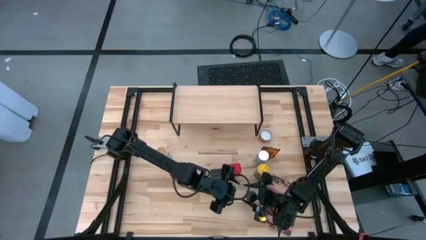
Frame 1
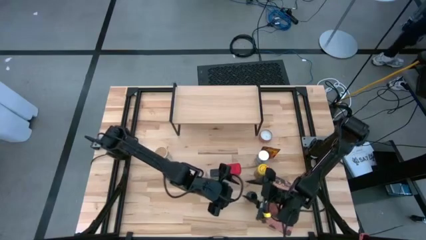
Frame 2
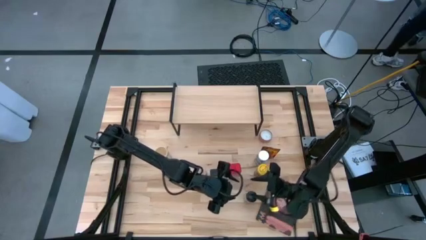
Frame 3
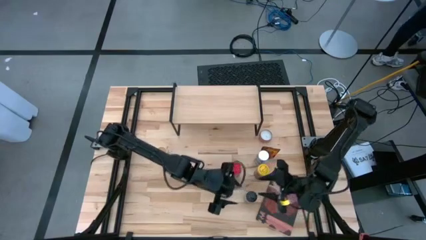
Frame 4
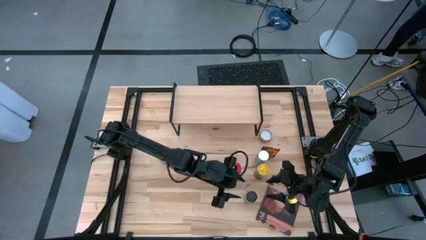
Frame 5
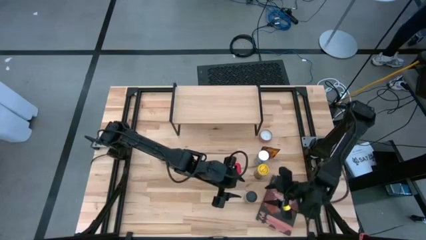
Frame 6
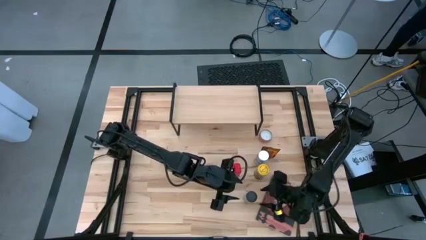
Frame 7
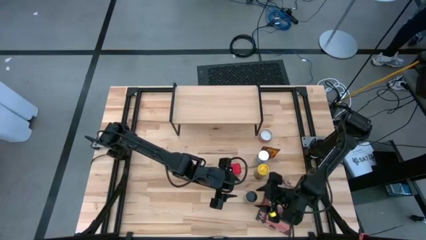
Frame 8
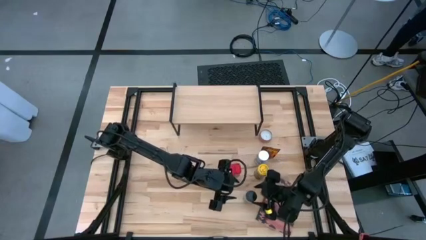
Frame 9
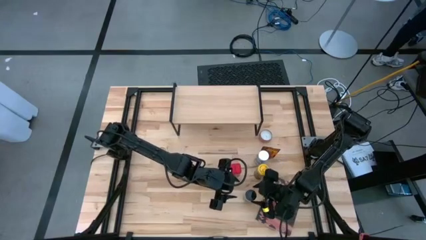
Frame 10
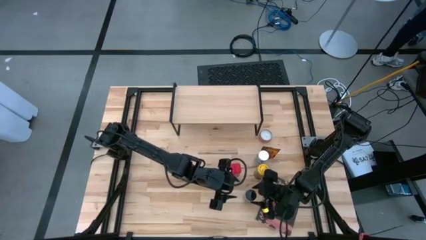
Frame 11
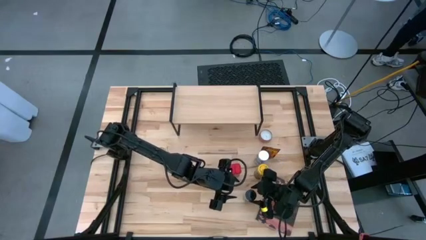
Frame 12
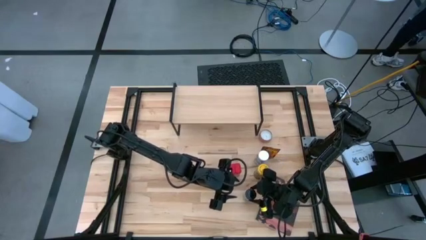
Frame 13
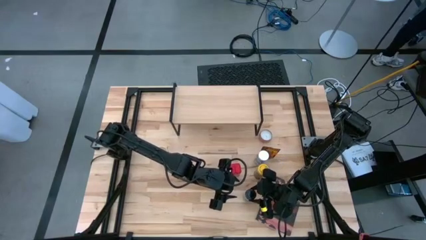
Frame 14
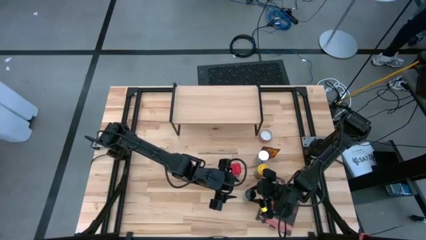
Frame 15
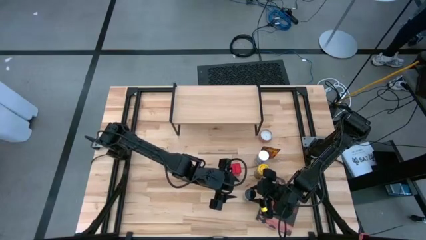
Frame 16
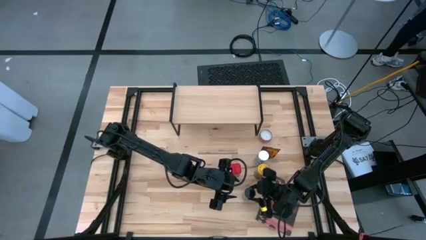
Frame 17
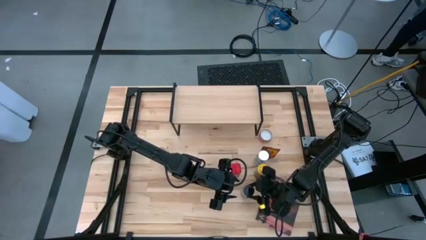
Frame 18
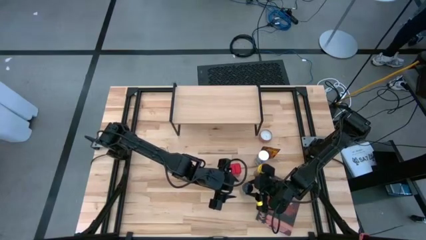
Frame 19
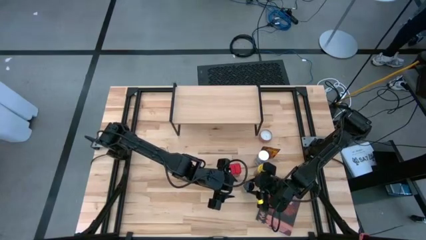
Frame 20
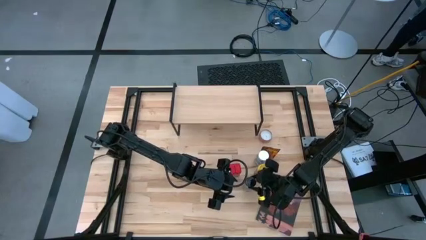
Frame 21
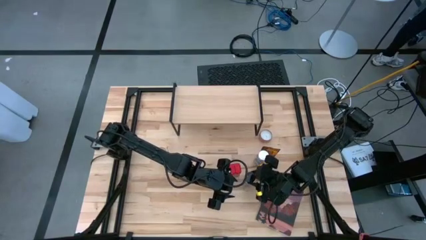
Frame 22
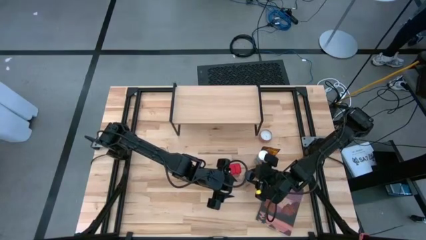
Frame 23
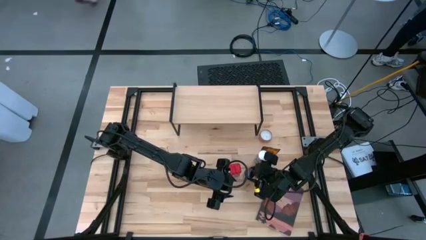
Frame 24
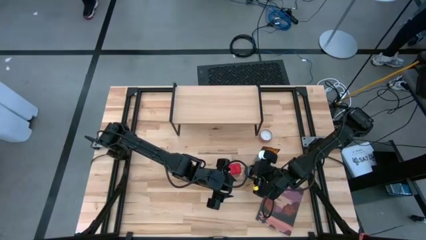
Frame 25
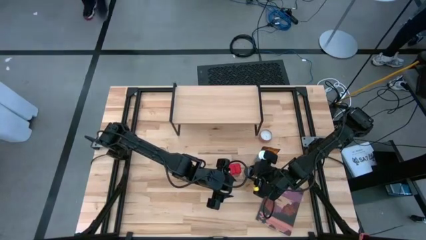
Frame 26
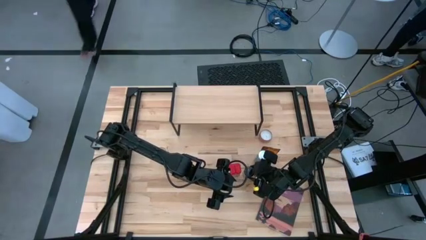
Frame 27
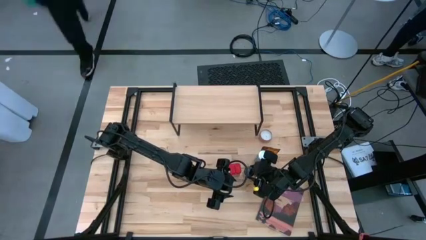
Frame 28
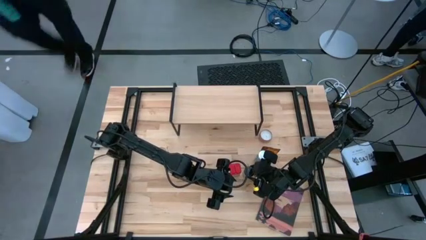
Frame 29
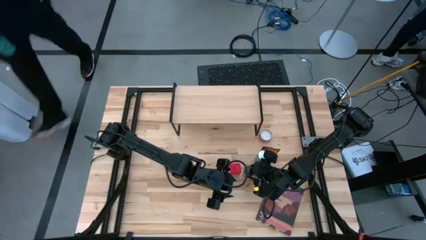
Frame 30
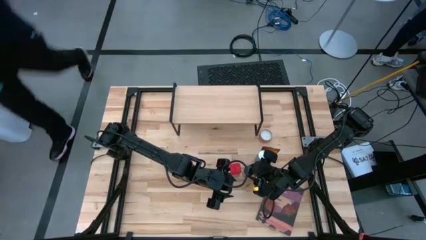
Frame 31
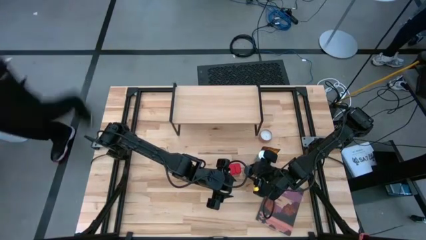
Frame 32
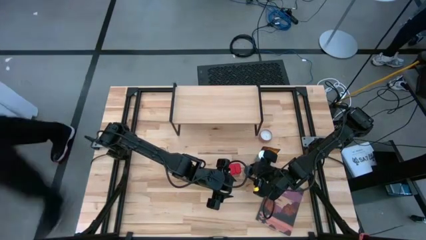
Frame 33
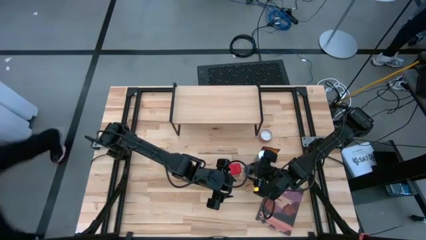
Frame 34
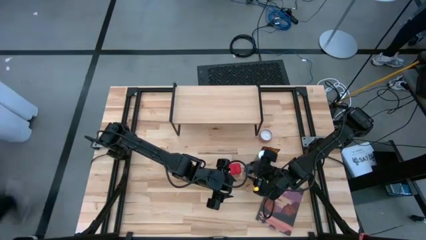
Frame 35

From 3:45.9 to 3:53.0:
Task: Shelf spices
Put the dark yellow spice bottle into the center of the table

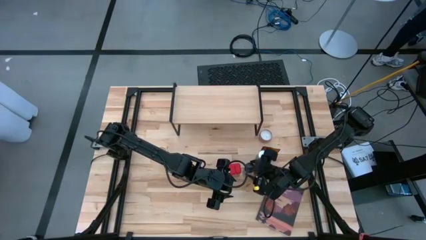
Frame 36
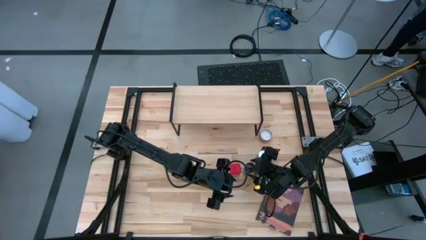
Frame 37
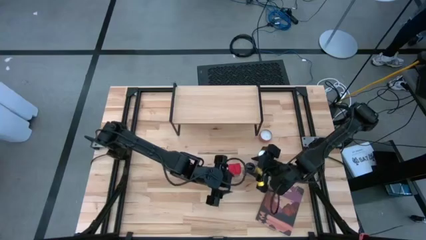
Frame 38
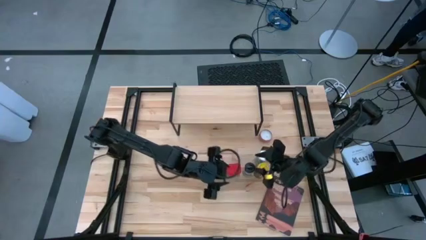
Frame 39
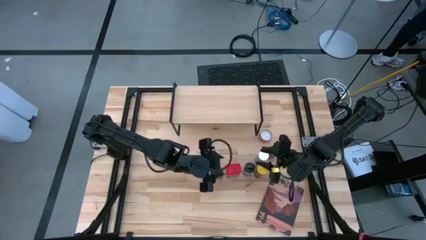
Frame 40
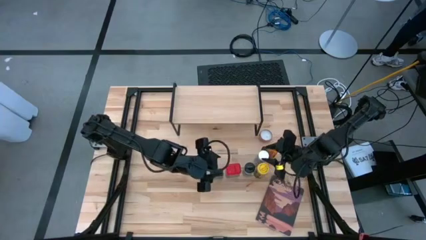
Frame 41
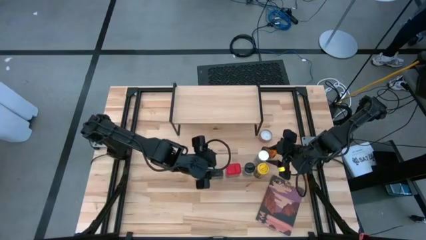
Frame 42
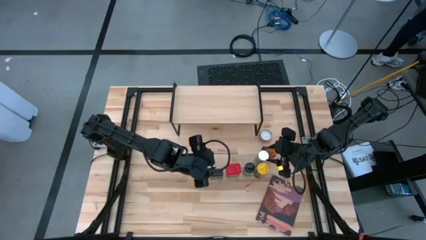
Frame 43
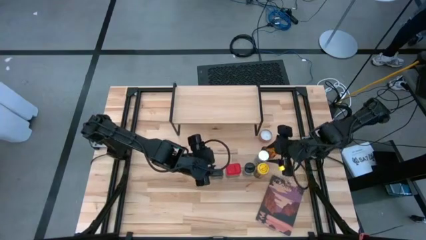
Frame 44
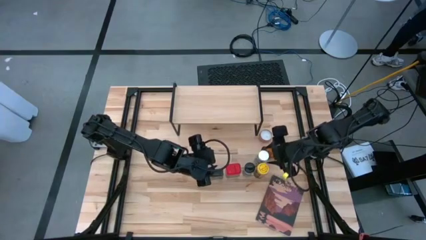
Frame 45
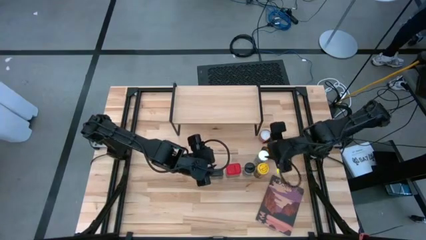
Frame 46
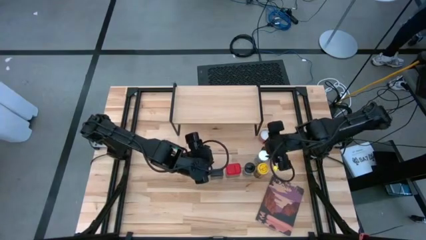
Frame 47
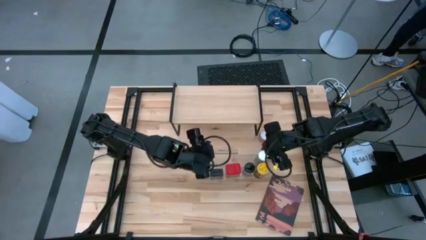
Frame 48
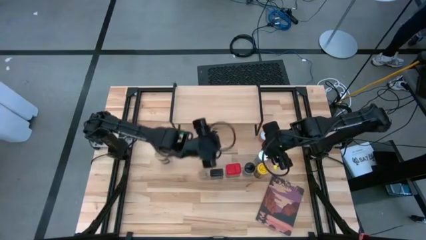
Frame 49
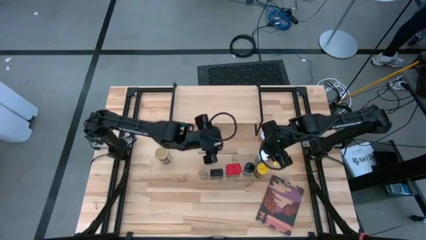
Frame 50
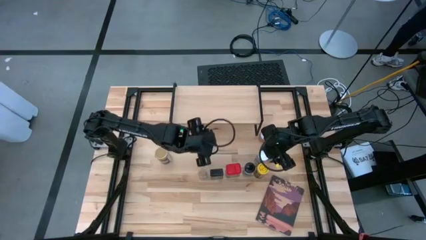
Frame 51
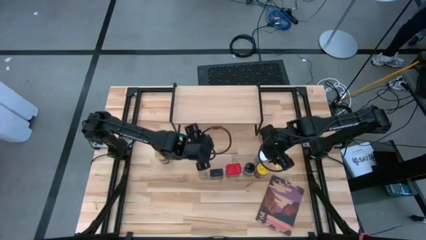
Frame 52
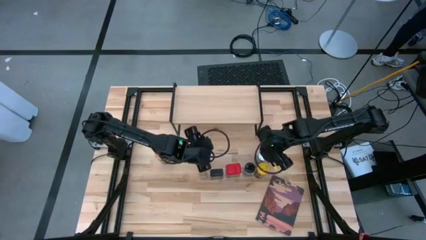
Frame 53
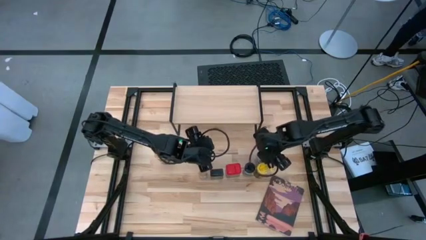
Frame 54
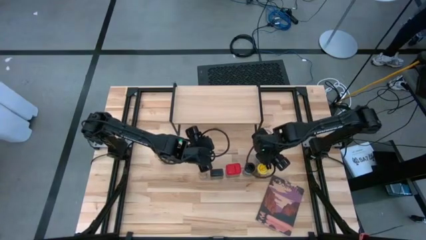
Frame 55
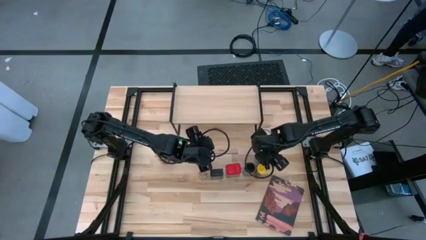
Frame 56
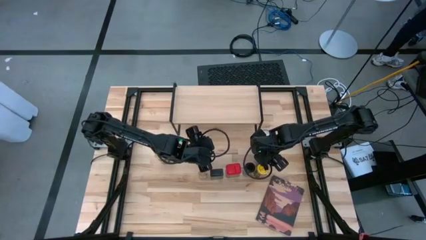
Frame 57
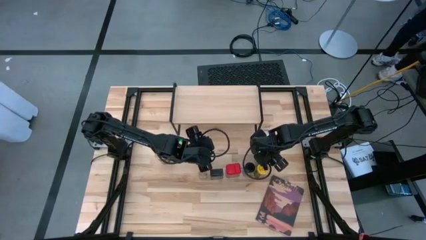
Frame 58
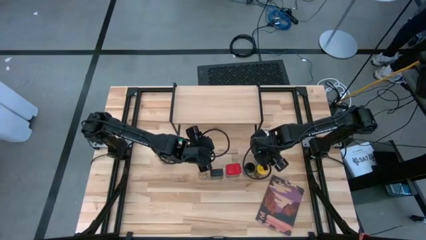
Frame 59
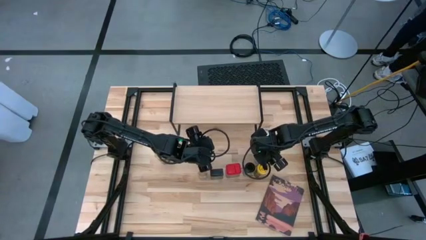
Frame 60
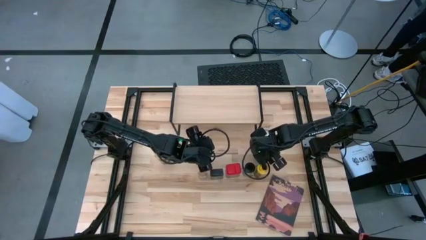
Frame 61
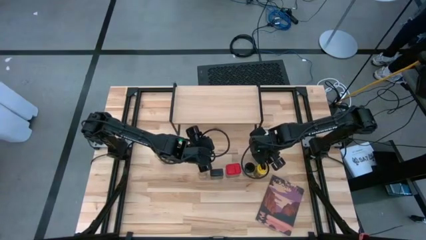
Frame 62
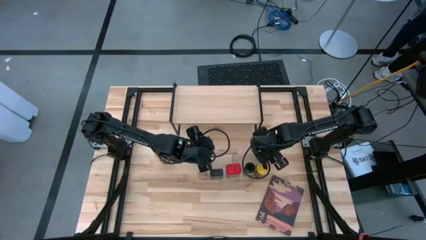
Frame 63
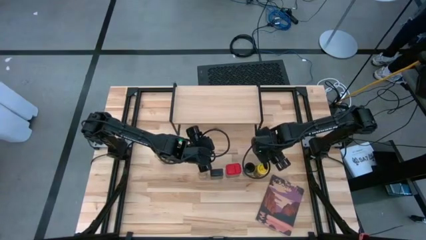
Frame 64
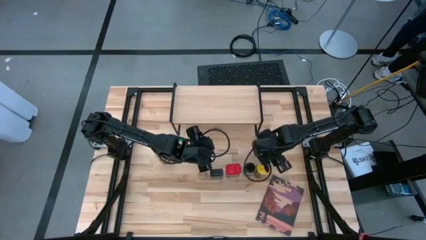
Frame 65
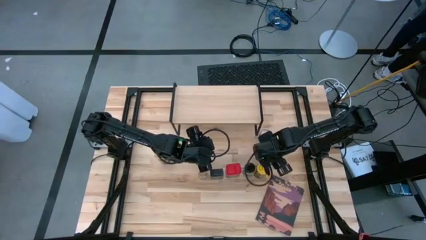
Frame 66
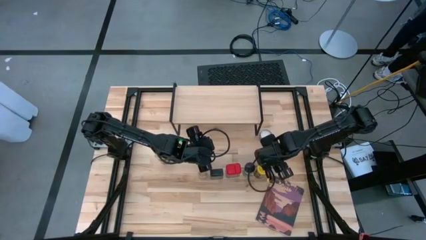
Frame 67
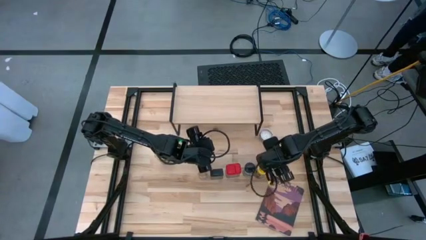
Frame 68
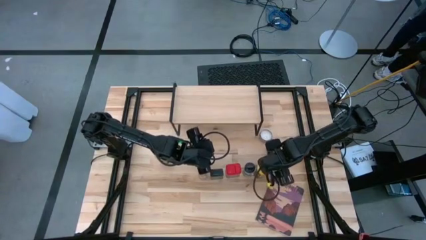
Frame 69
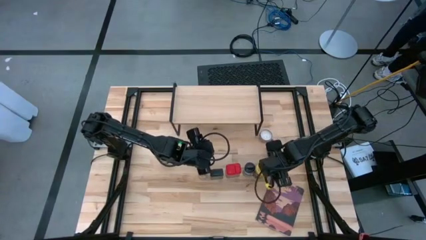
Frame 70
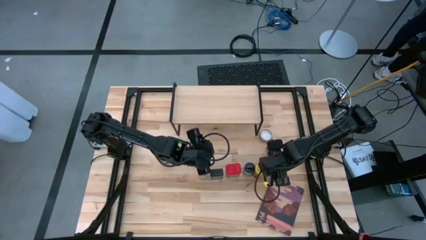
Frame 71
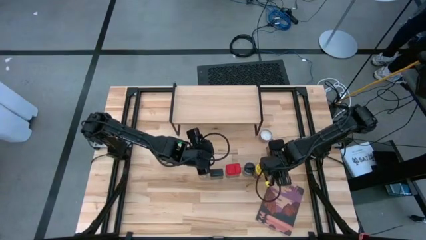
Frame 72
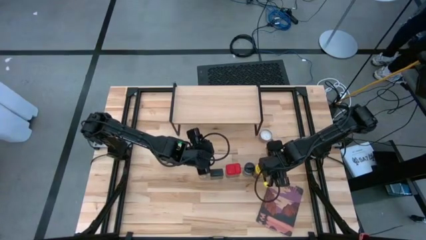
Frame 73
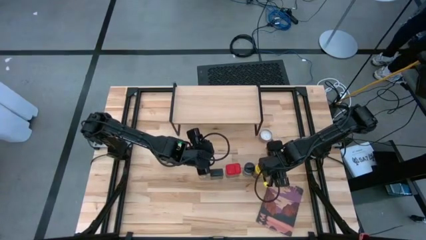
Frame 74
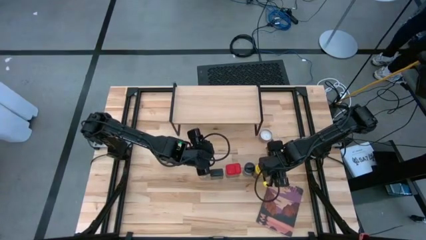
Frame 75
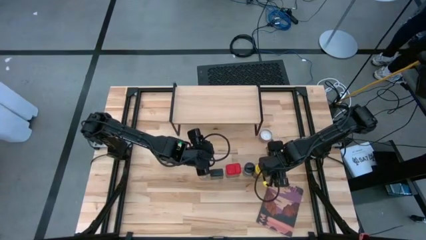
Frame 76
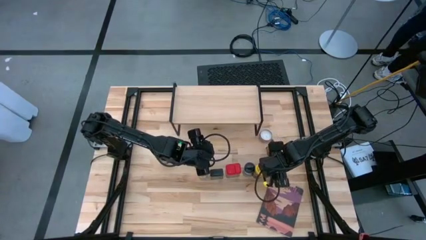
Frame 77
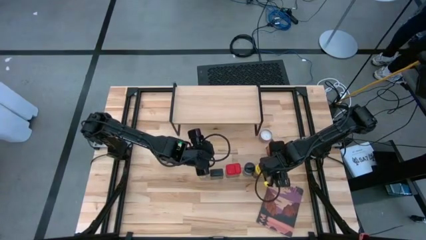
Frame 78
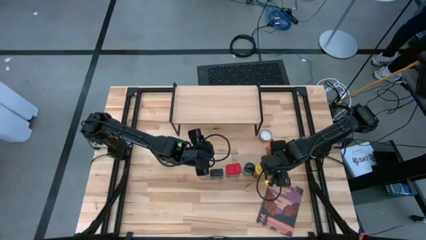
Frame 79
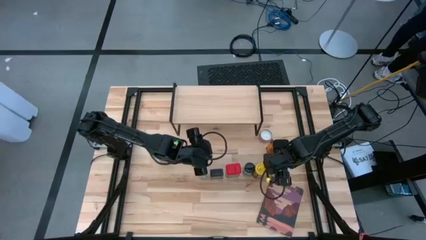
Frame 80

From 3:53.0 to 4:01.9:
Put the white spice bottle in the center right of the table
